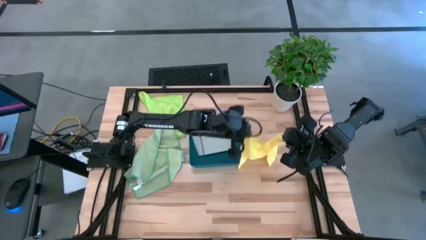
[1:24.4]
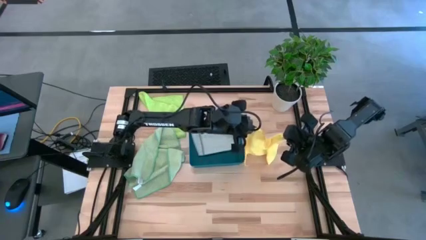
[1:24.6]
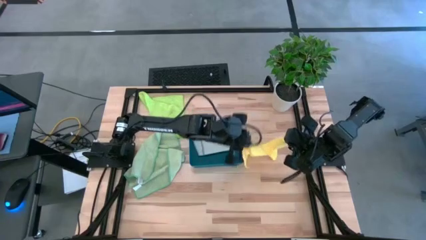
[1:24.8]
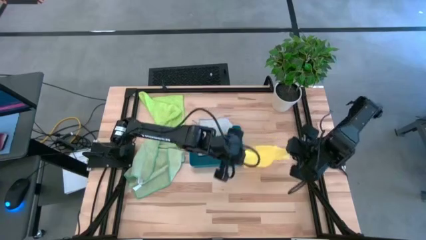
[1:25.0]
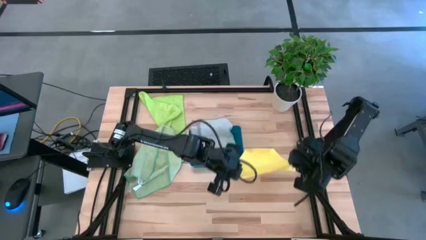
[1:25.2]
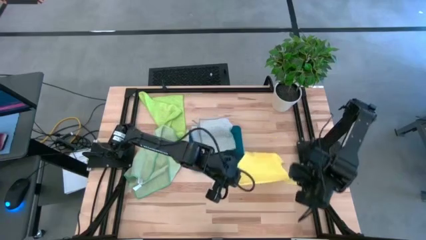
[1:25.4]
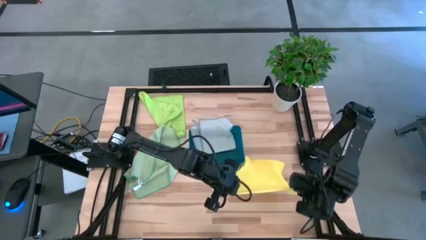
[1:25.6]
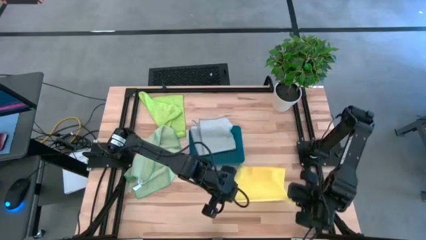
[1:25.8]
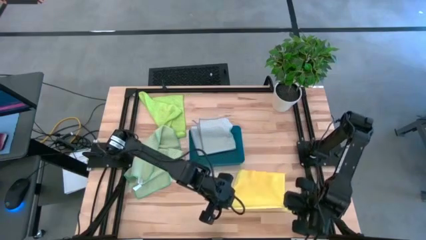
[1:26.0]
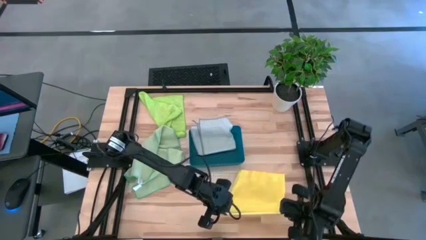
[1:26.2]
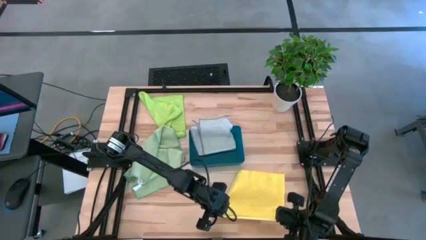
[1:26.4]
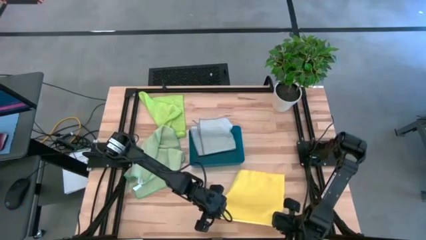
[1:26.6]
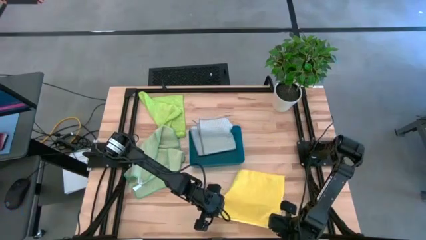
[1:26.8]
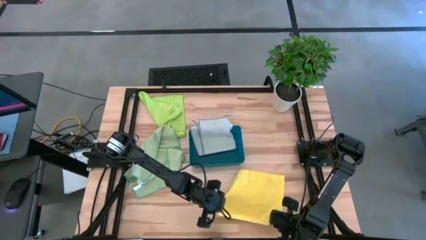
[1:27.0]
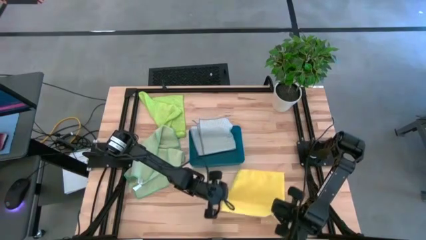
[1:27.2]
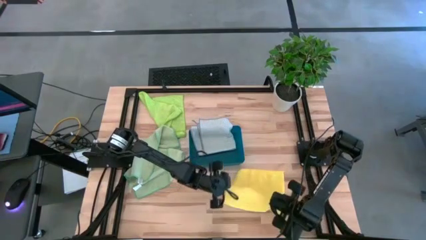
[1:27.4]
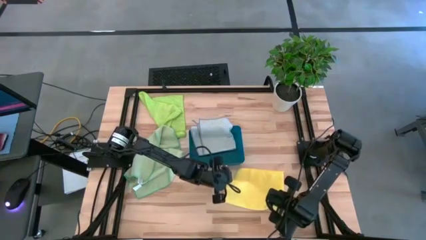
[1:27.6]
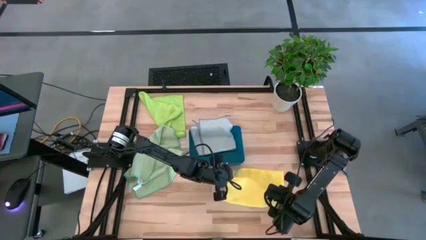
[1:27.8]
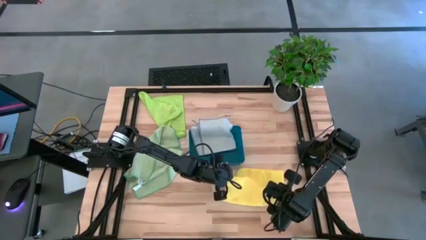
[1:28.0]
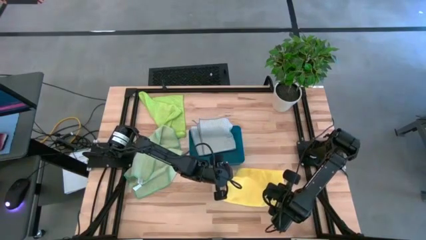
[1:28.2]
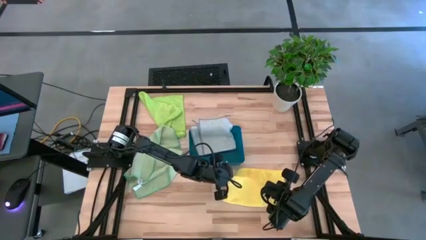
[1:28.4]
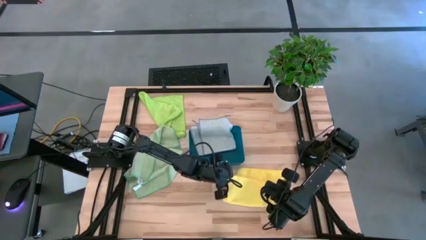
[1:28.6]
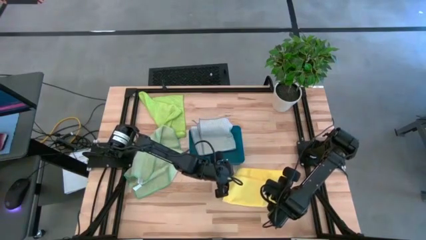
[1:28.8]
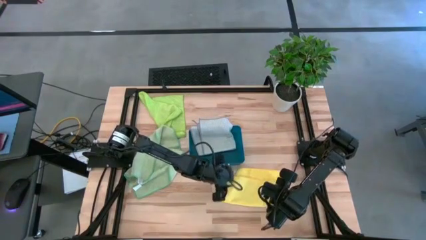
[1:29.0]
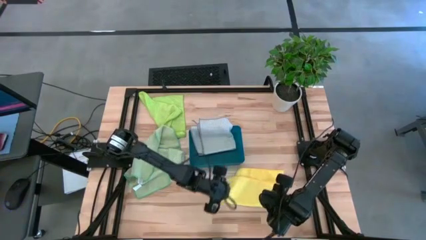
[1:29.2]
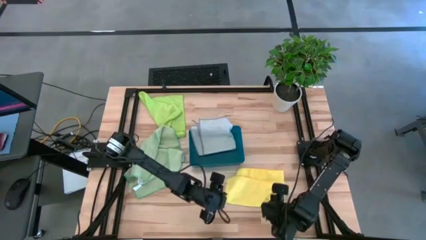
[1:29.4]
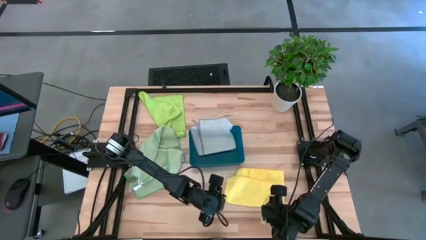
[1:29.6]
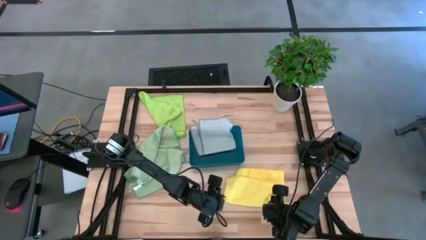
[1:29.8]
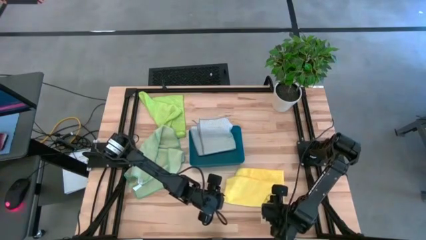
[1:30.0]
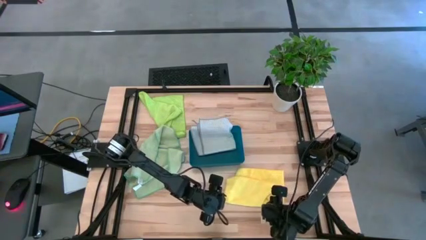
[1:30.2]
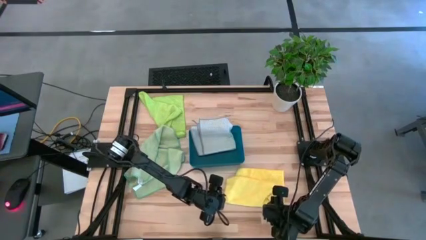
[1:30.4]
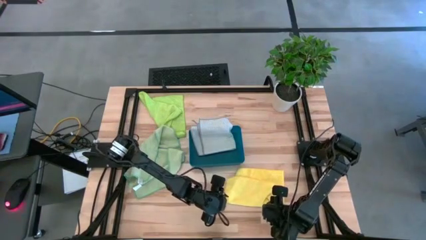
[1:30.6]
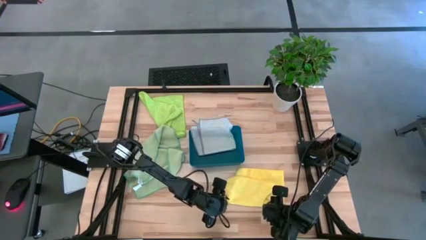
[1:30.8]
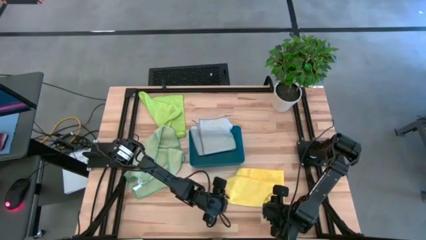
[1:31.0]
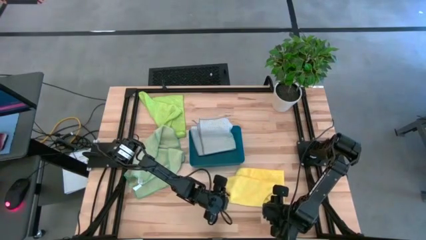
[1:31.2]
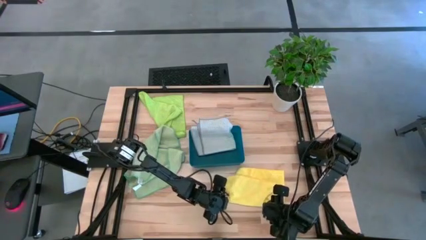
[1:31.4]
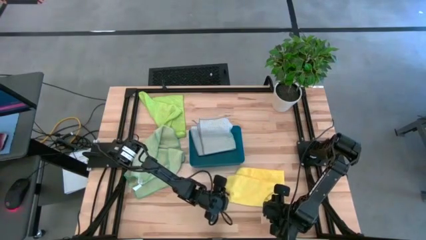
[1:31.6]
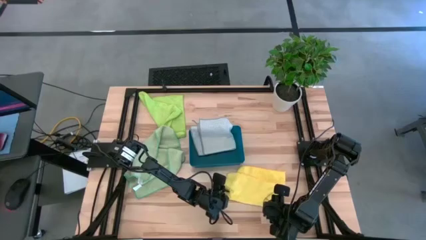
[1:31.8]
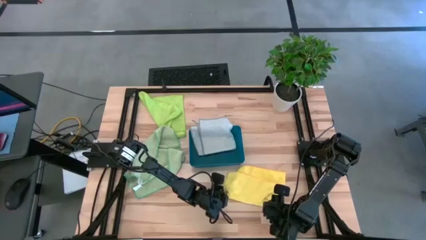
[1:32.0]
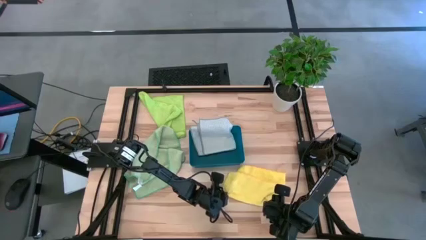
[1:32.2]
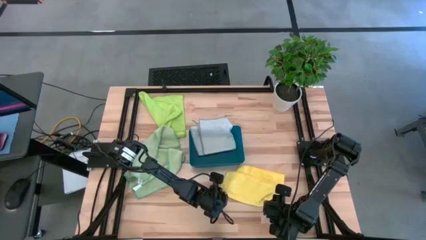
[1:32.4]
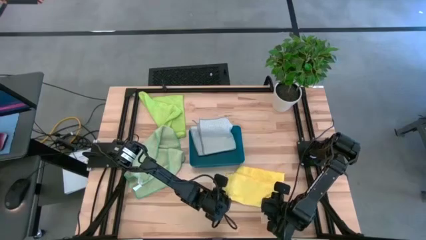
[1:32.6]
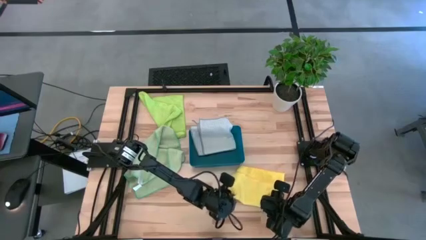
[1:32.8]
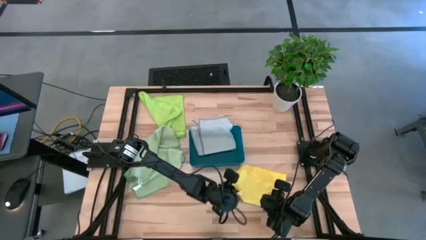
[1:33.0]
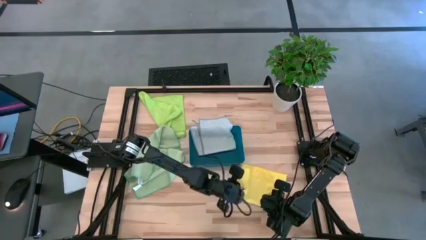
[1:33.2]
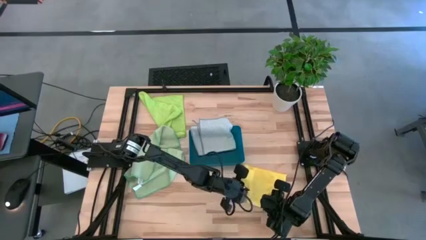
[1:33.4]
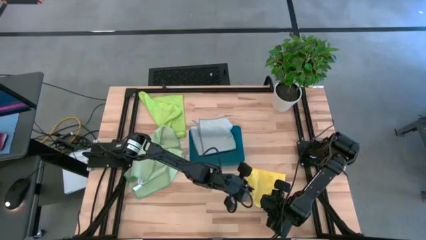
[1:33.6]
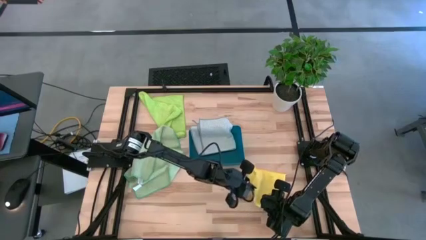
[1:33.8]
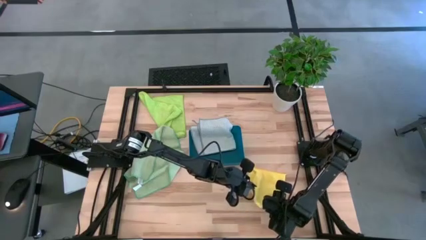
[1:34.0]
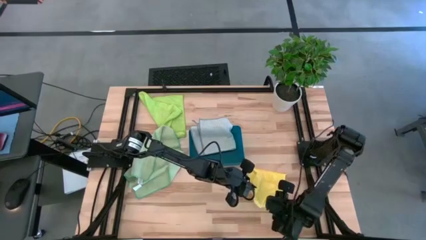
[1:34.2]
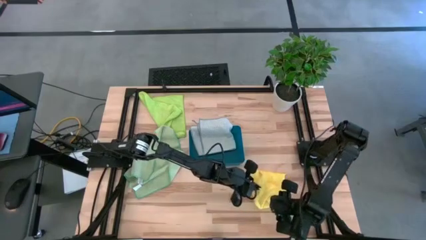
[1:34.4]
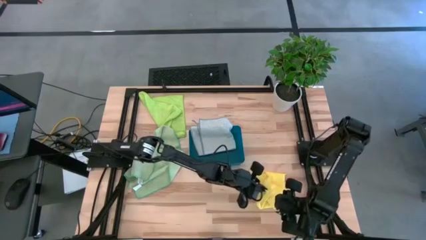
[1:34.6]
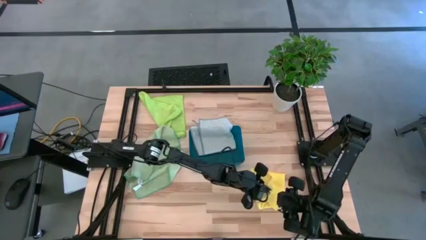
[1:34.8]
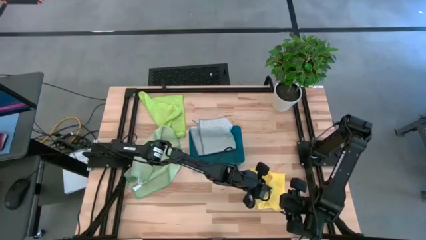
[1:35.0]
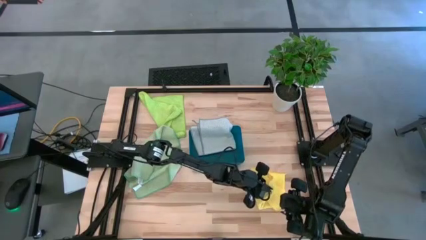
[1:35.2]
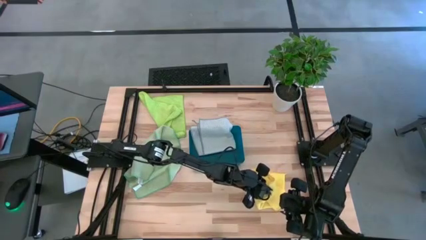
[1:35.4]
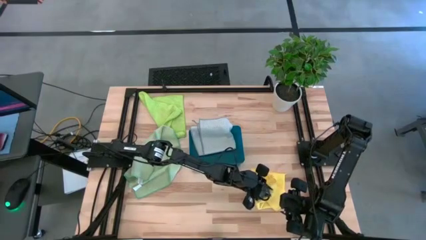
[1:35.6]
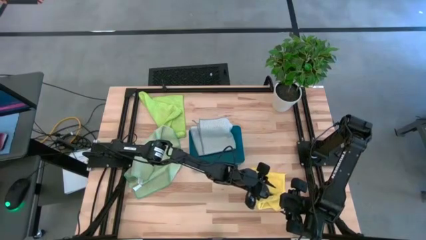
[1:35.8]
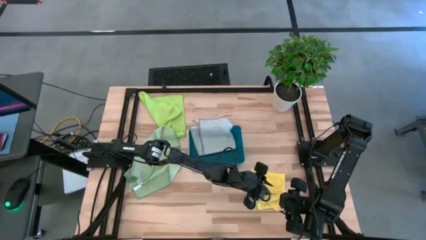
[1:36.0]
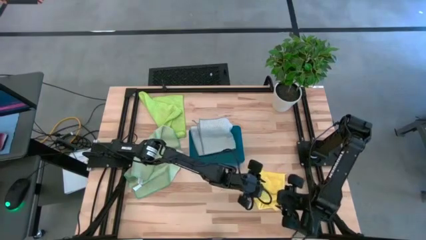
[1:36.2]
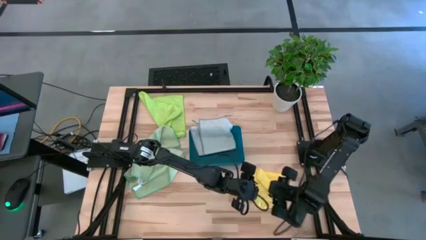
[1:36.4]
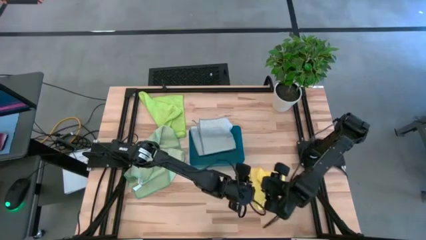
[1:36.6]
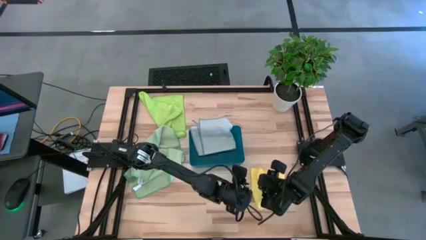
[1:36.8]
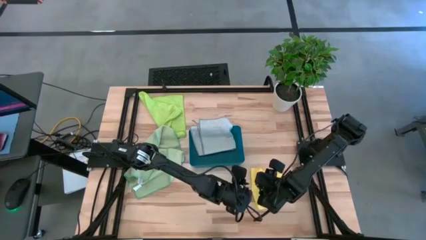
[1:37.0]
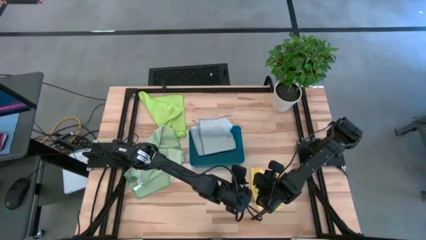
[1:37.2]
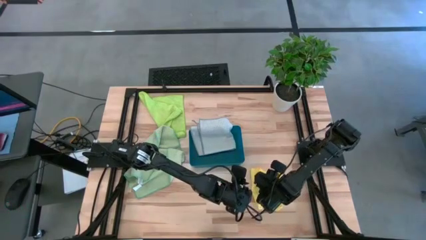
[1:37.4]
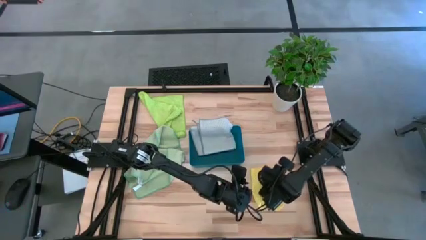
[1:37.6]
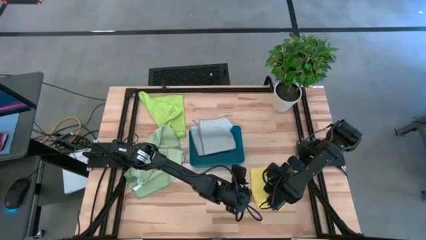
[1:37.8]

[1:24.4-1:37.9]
Task: Fold microfiber towels
Fold the yellow microfiber towel

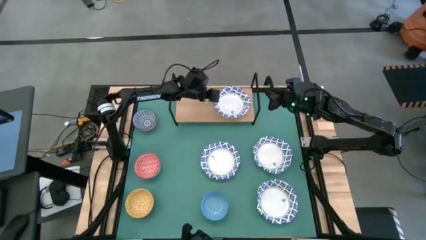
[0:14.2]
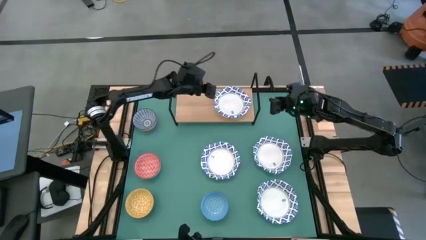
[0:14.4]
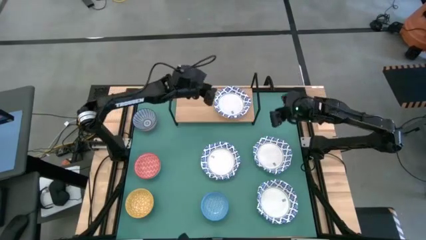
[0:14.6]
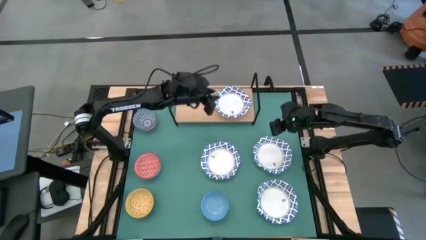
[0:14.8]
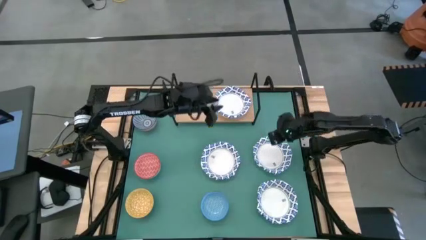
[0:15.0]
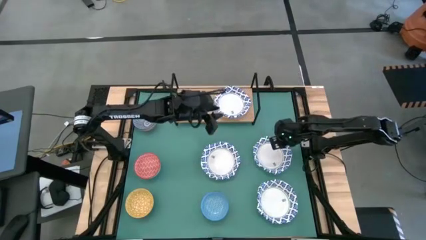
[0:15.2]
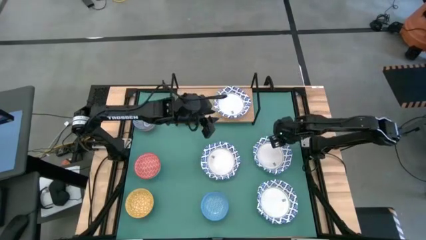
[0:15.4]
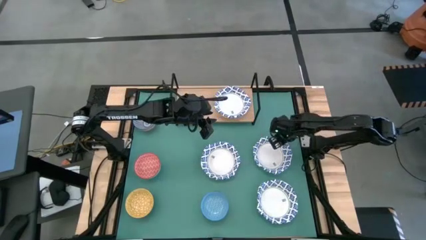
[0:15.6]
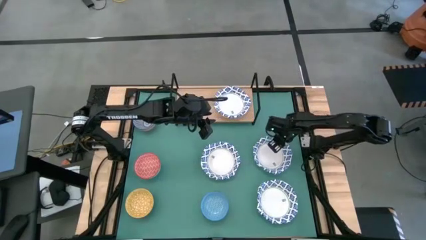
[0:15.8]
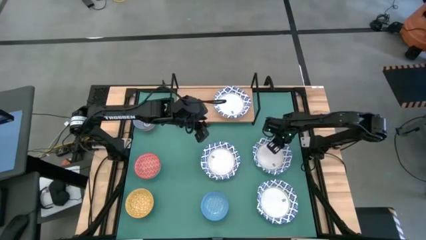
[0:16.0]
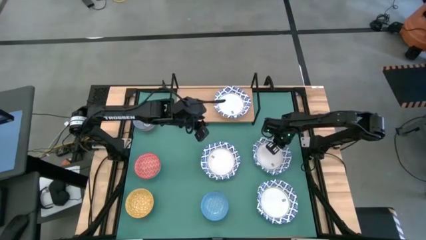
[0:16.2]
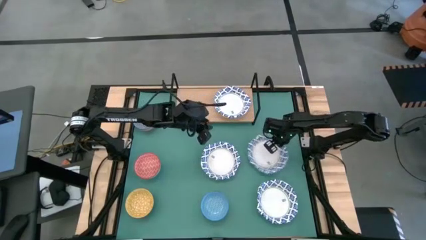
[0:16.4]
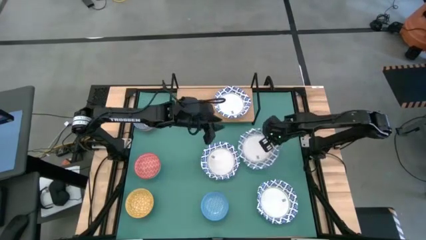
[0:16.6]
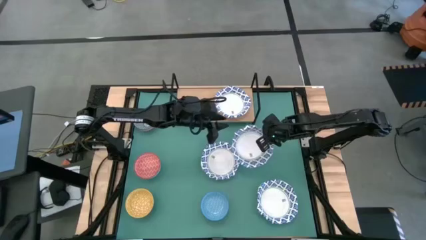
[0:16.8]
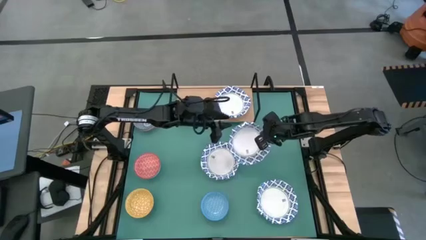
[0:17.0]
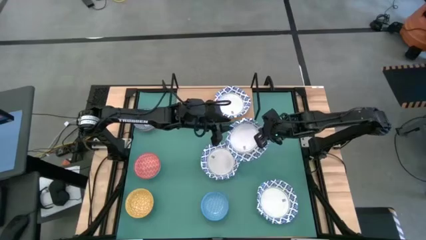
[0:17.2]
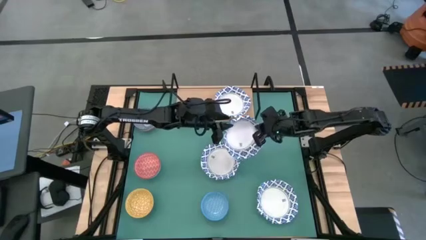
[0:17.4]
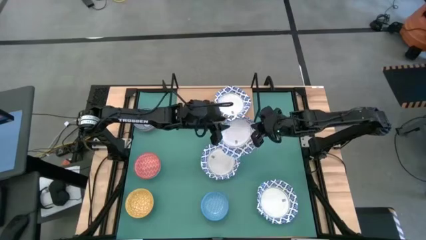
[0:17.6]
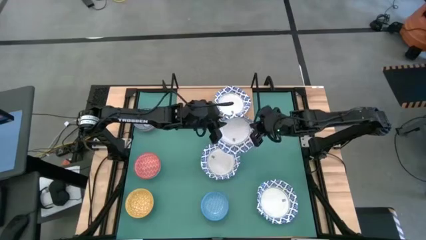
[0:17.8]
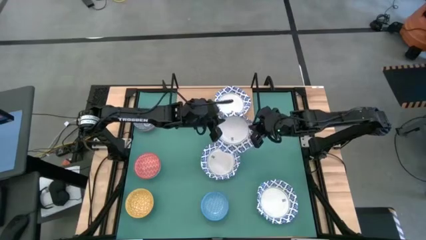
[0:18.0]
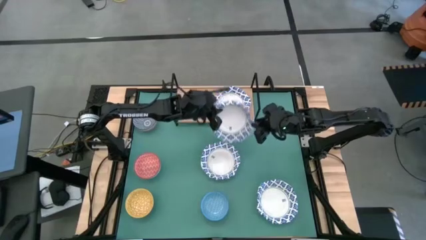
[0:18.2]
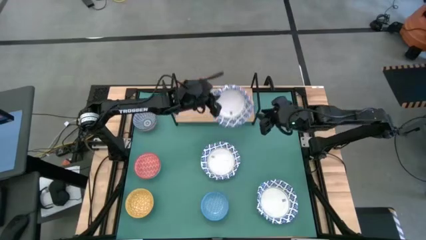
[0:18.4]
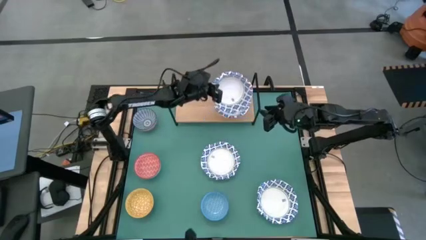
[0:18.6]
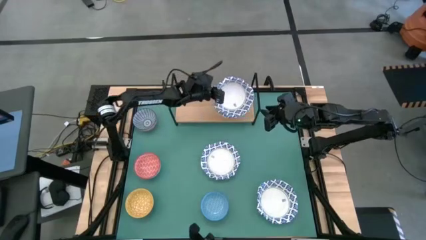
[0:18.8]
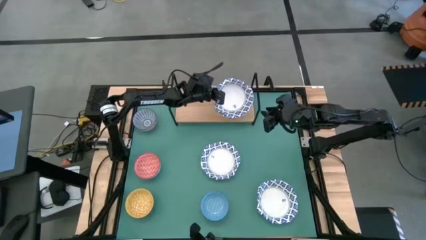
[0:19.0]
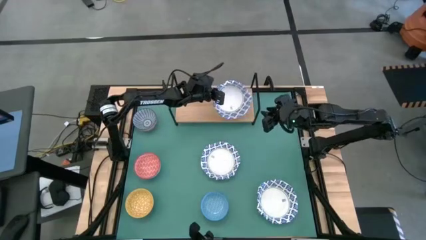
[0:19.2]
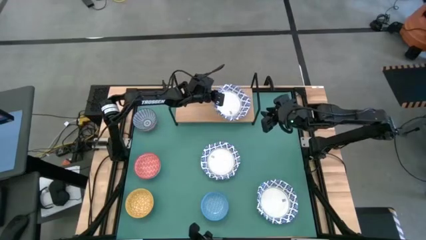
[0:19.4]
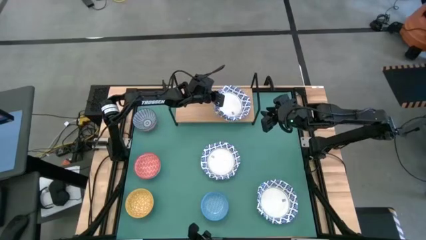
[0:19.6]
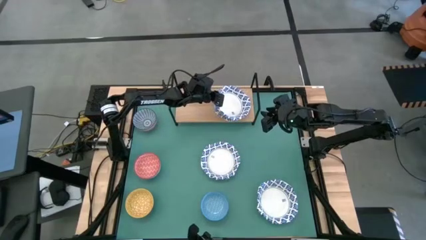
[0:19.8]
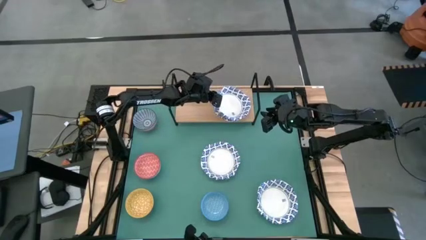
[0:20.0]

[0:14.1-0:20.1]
Task: Place and stack bowls onto a shelf
Stack the white bowl on top of the white bowl on the shelf
